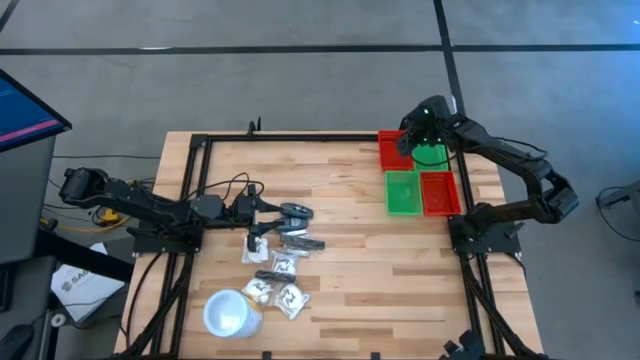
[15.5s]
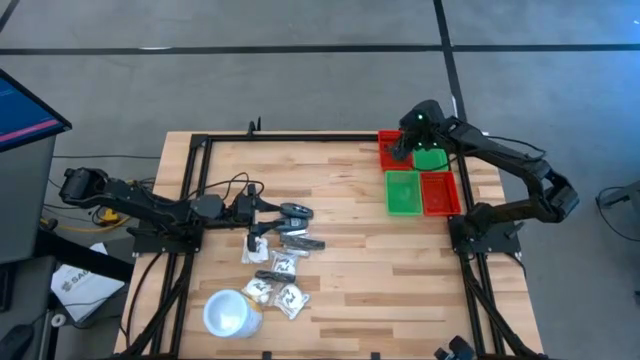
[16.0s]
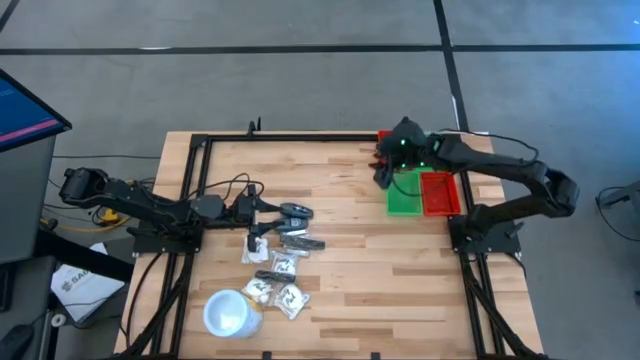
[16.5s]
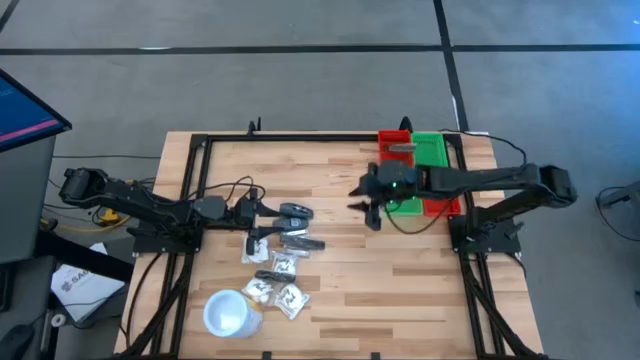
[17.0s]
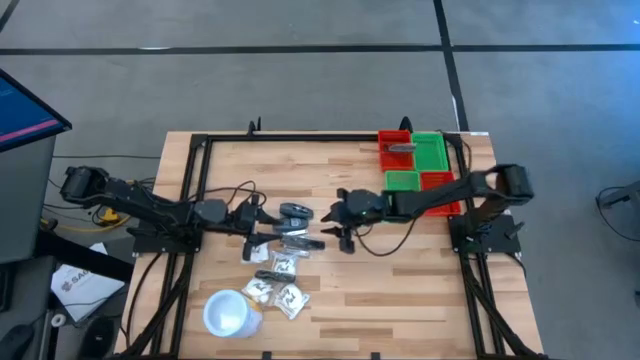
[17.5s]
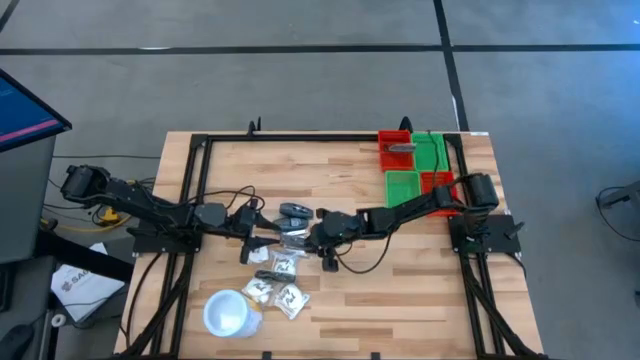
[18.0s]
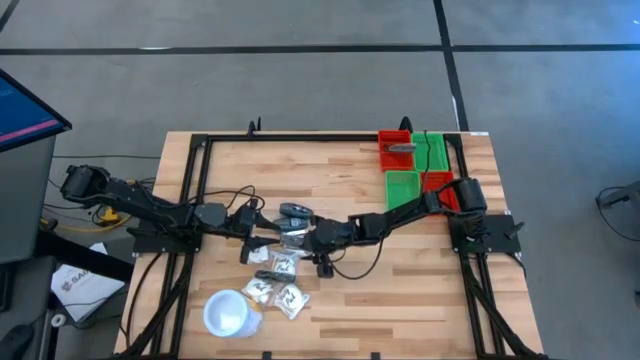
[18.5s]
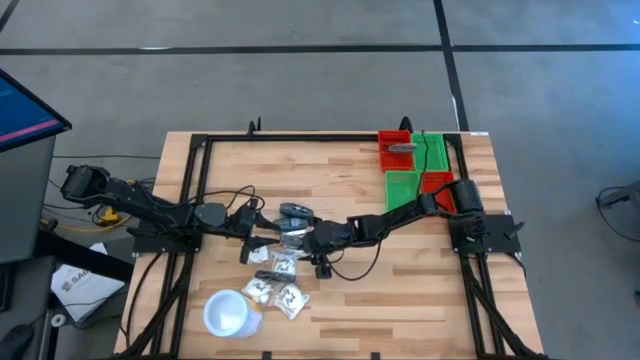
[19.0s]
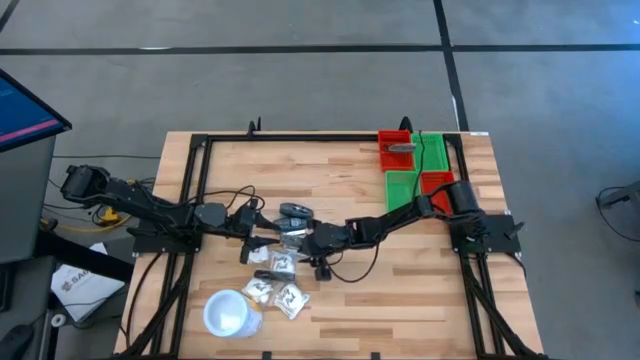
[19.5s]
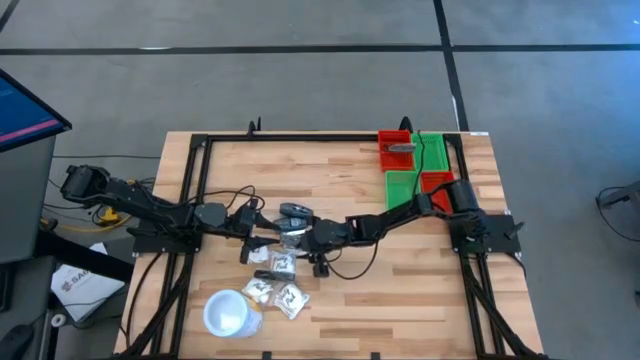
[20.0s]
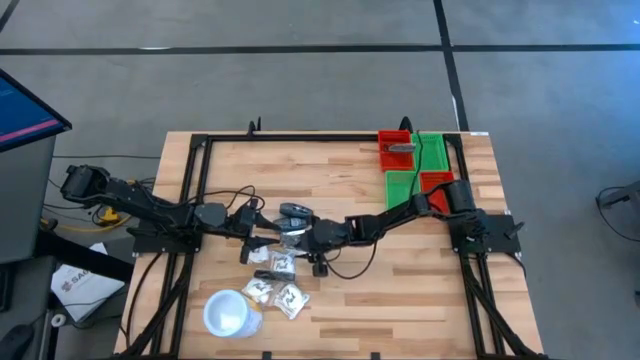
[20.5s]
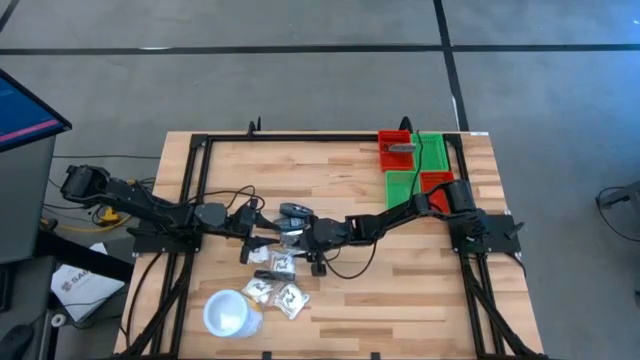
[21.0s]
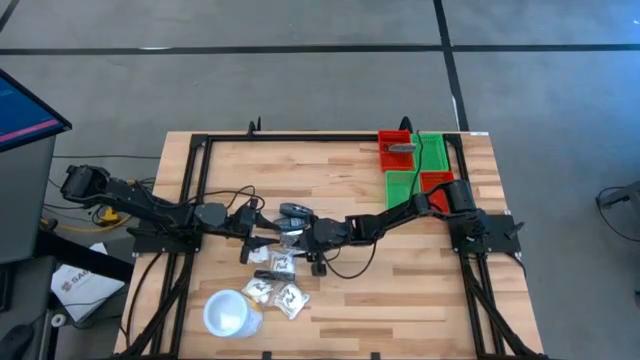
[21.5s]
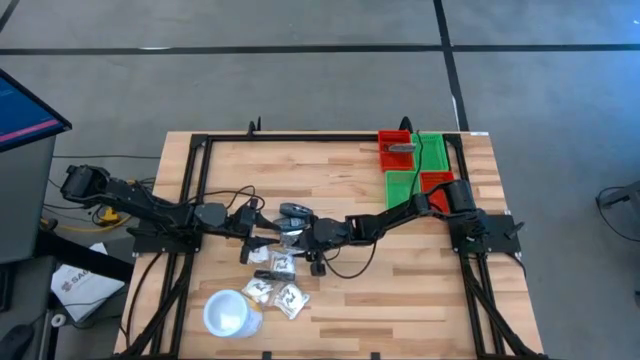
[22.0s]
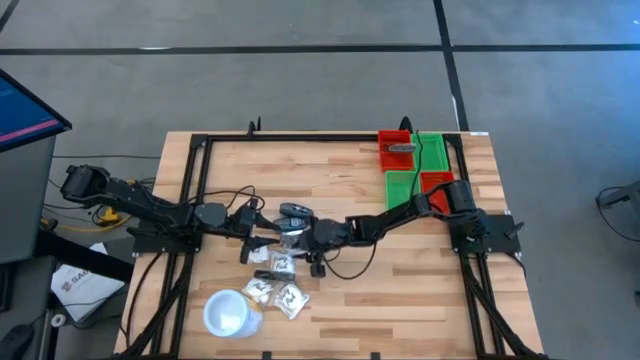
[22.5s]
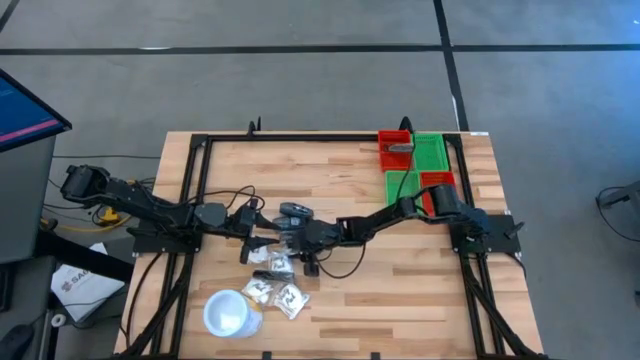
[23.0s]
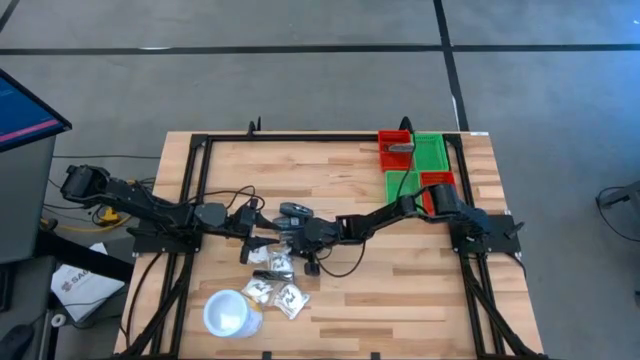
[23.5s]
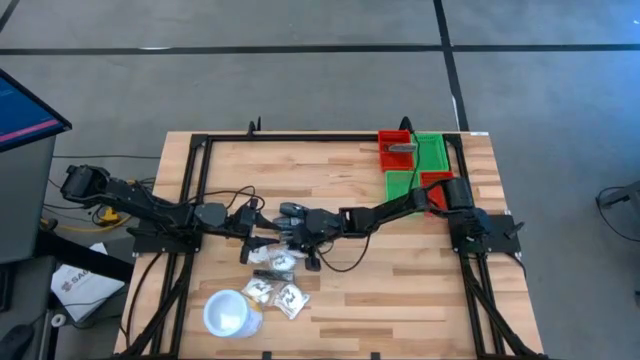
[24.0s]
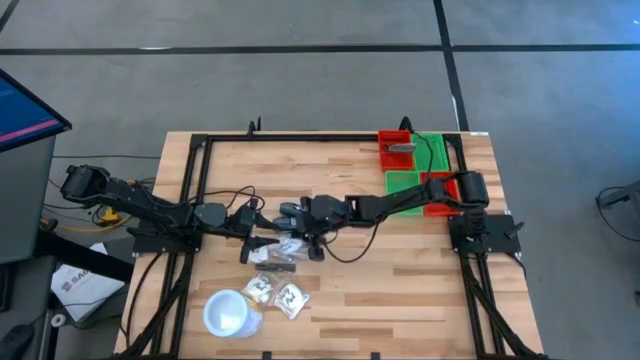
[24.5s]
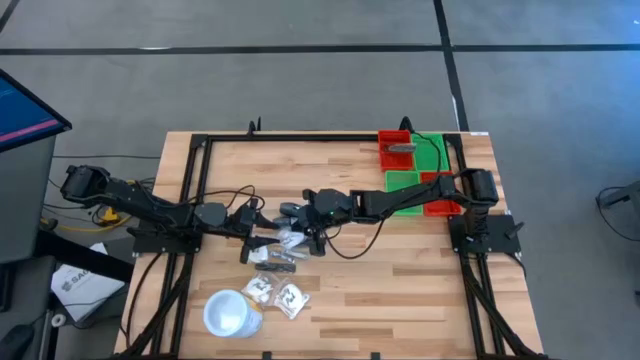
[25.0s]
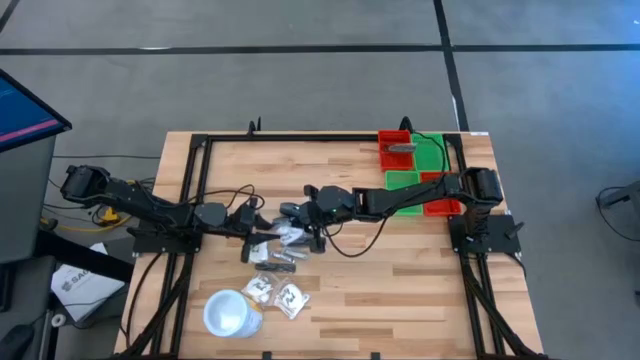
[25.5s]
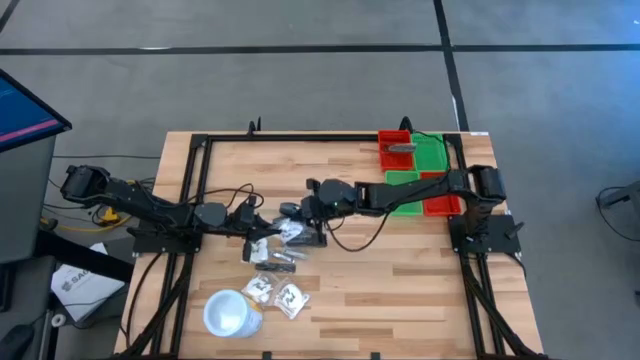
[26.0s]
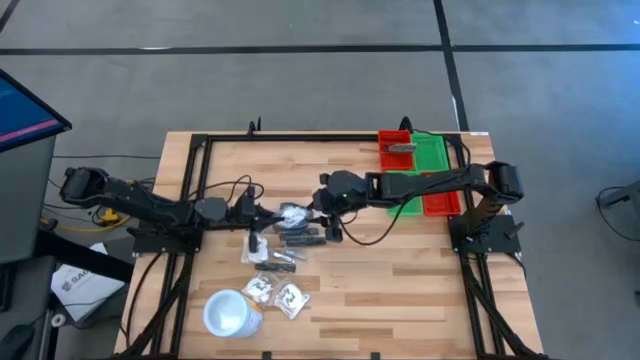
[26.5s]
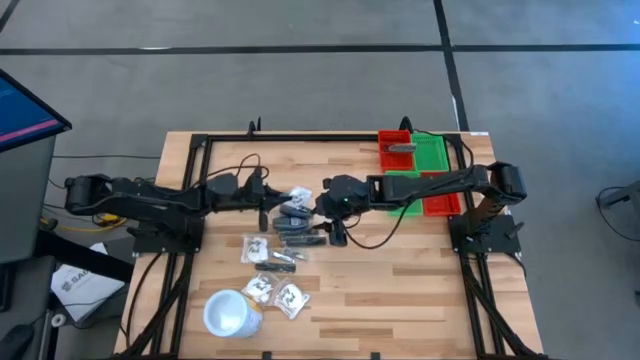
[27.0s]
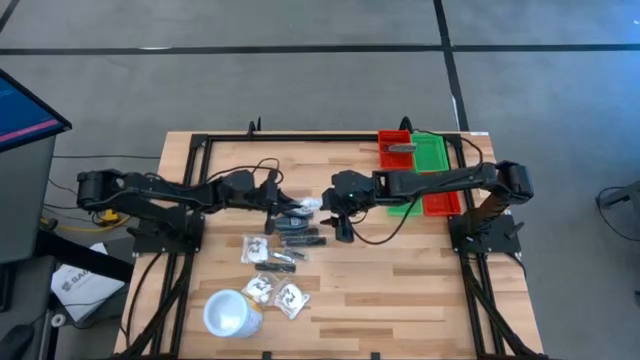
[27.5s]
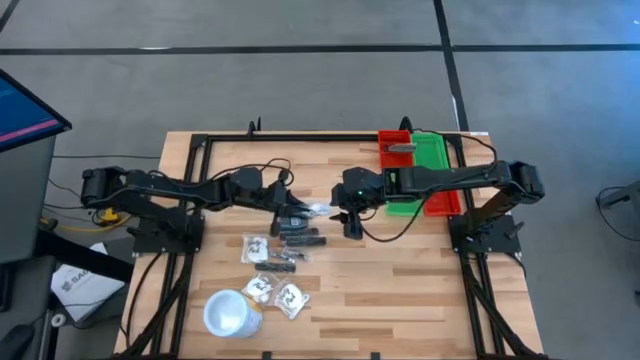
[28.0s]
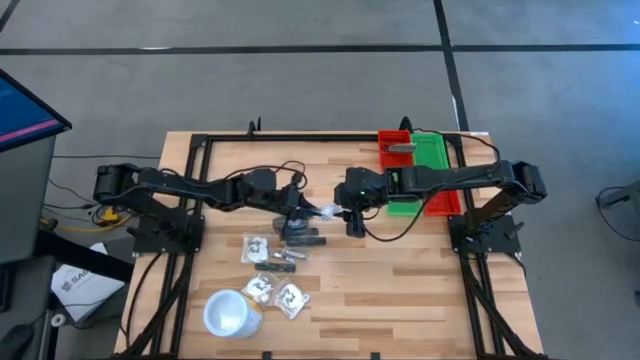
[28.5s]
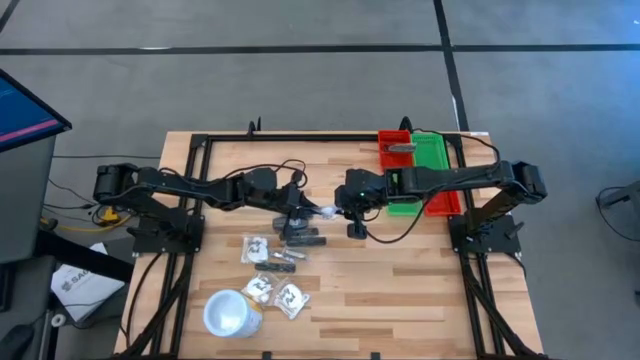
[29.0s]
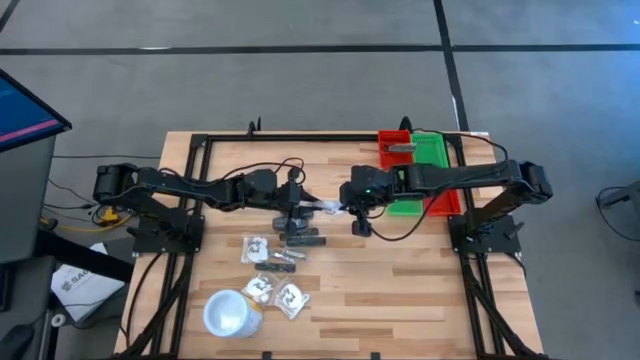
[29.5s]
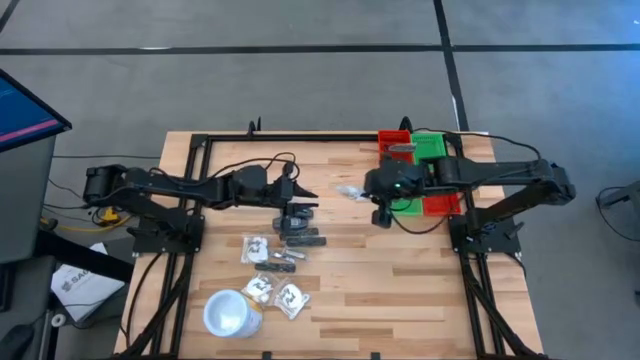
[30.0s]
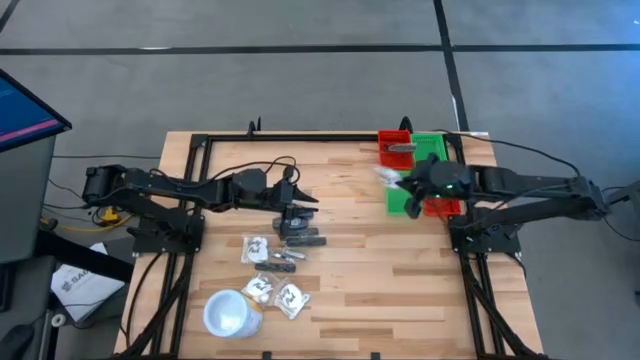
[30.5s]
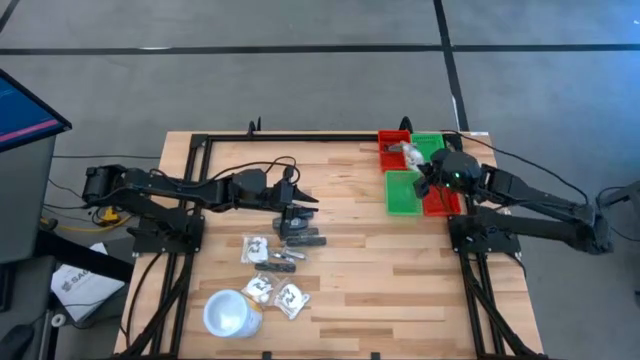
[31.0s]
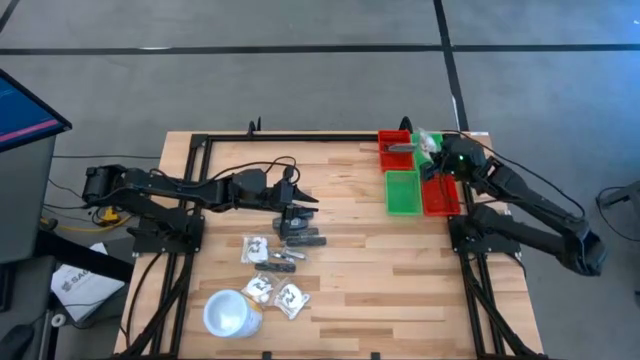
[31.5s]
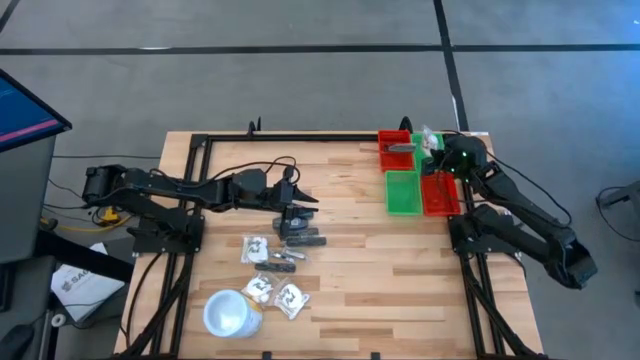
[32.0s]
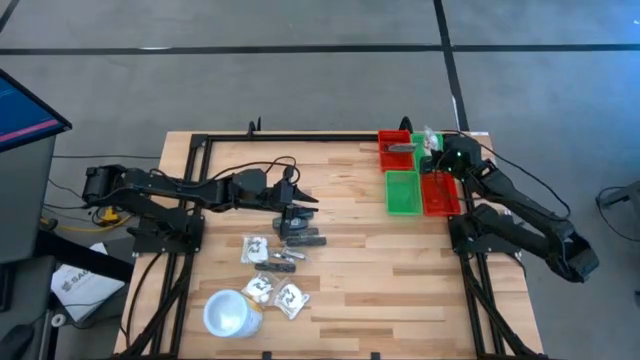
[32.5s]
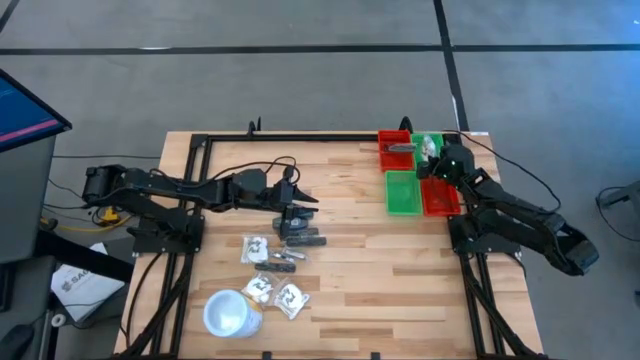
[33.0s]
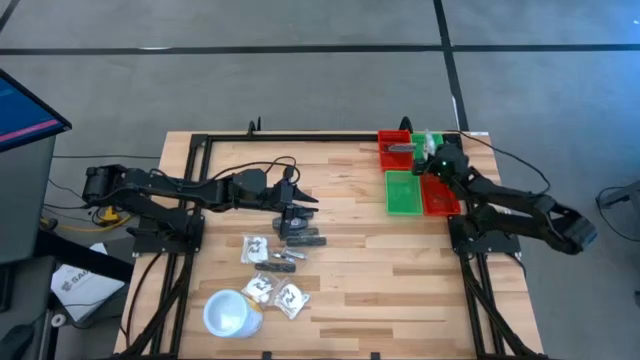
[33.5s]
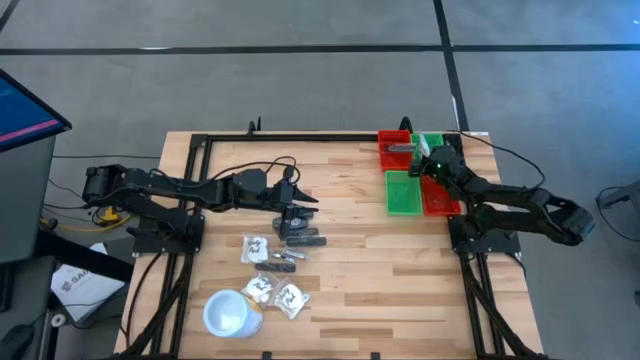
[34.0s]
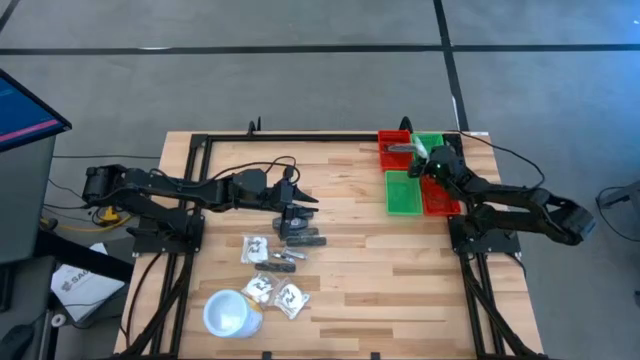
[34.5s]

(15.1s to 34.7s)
Task: Pick & Place Travel size toiletries
Put the white cotton pack into the top green bin
